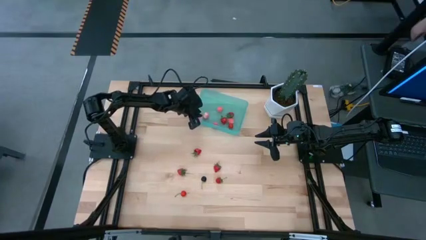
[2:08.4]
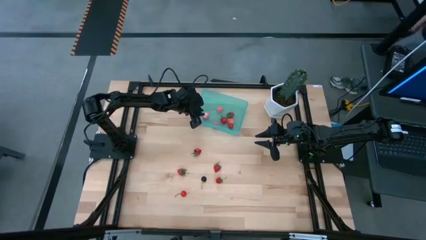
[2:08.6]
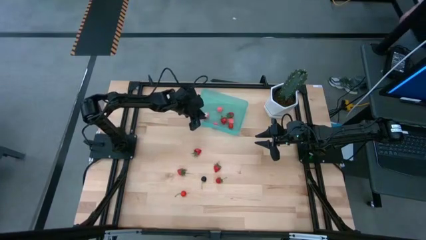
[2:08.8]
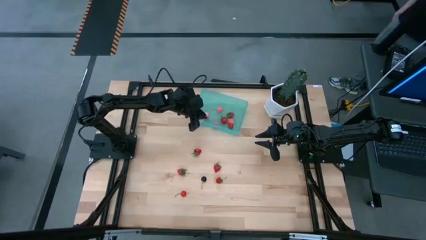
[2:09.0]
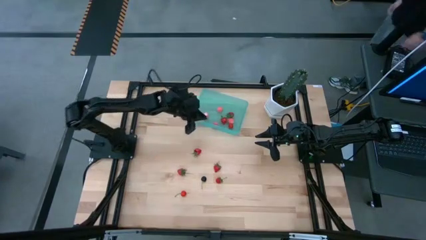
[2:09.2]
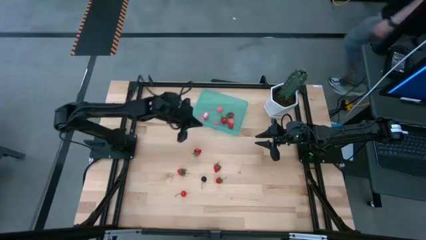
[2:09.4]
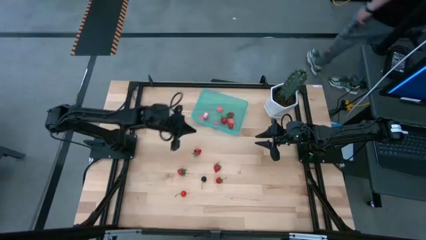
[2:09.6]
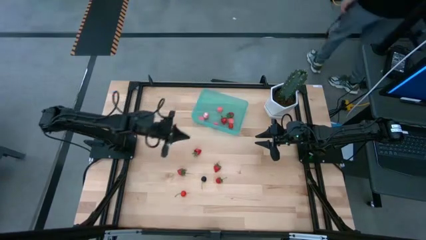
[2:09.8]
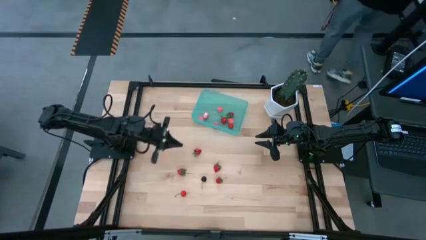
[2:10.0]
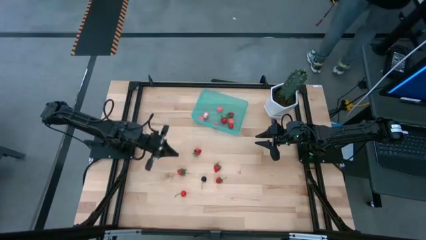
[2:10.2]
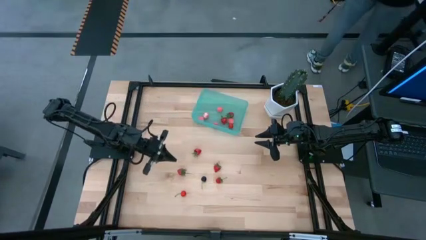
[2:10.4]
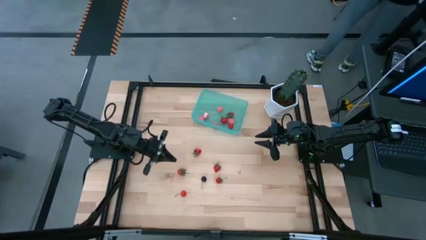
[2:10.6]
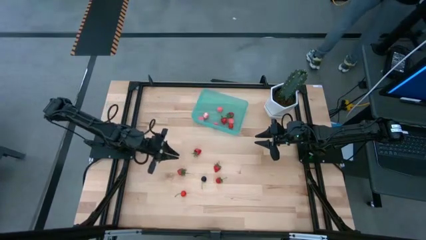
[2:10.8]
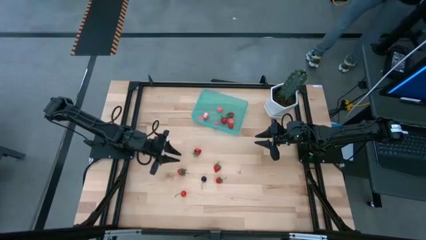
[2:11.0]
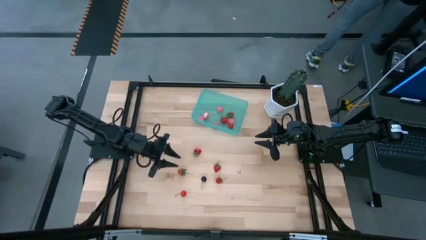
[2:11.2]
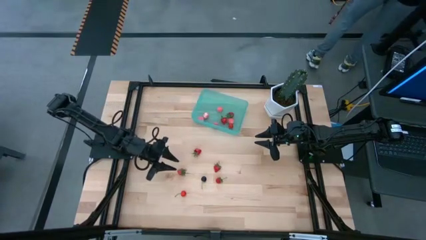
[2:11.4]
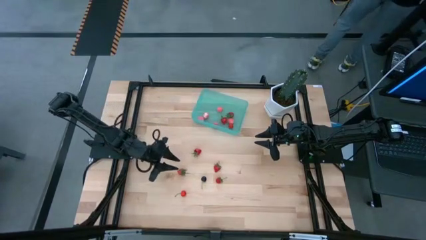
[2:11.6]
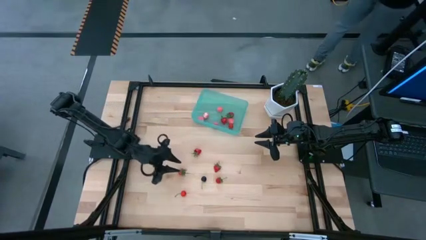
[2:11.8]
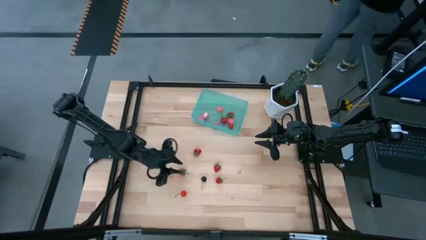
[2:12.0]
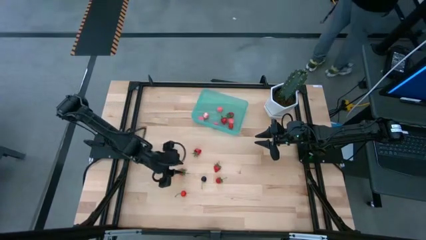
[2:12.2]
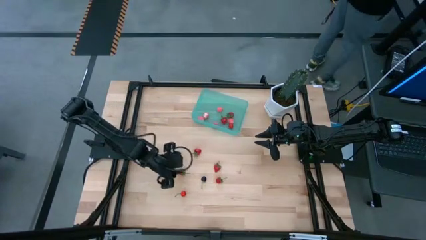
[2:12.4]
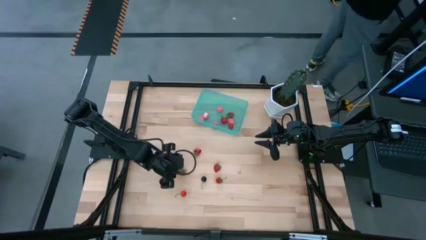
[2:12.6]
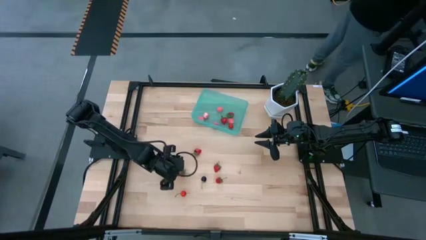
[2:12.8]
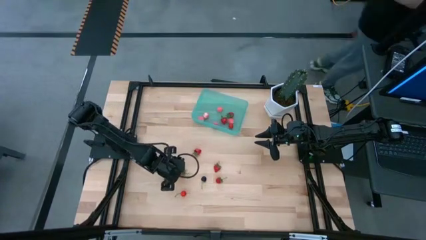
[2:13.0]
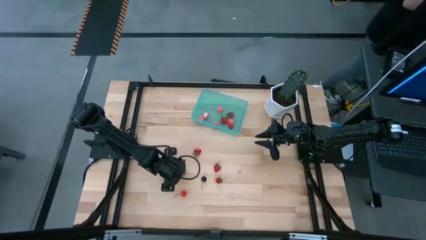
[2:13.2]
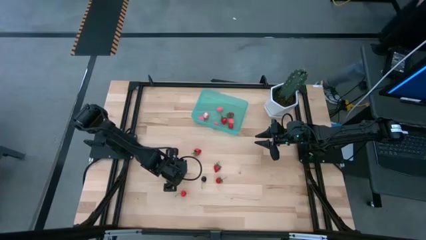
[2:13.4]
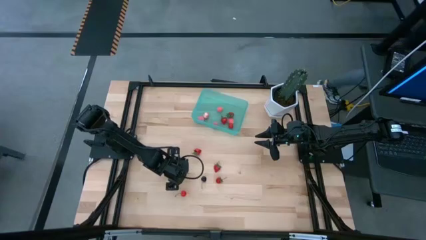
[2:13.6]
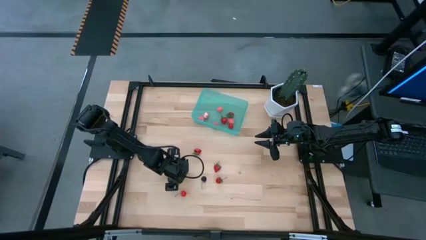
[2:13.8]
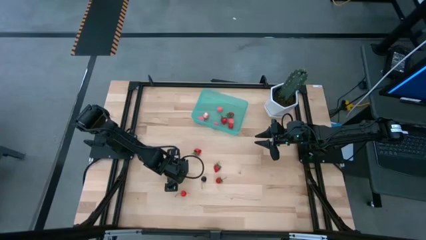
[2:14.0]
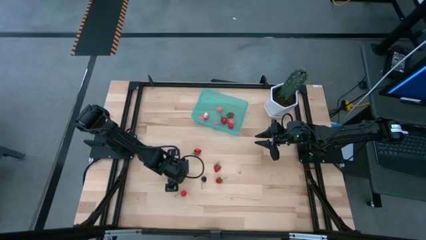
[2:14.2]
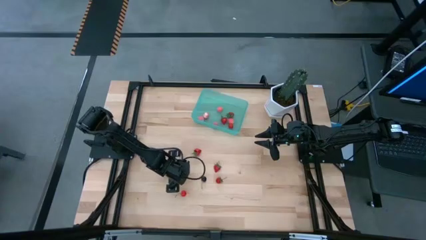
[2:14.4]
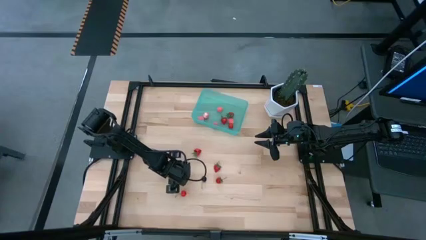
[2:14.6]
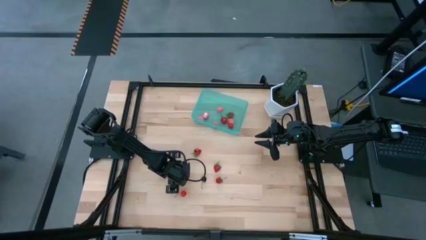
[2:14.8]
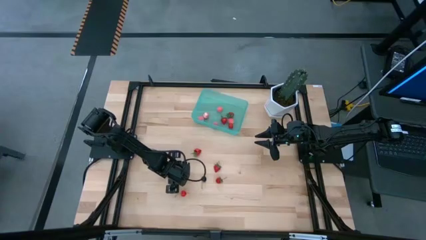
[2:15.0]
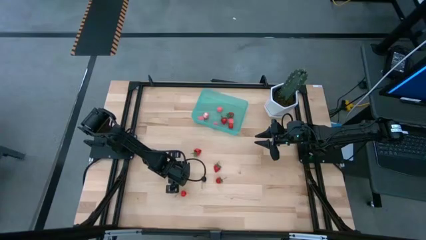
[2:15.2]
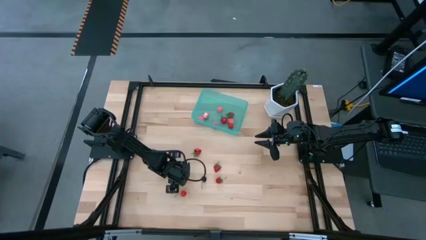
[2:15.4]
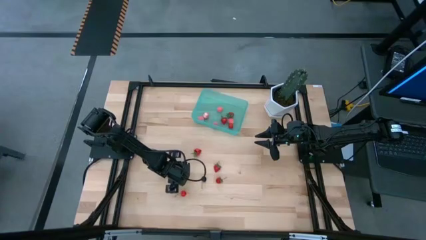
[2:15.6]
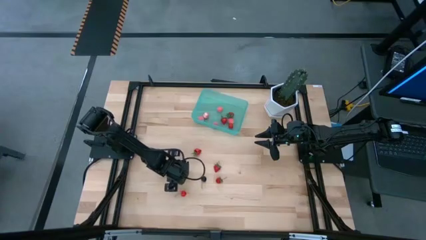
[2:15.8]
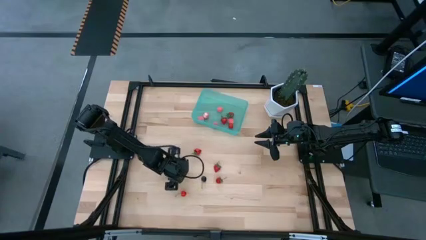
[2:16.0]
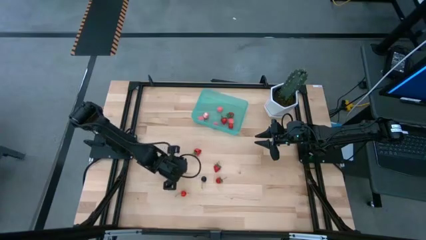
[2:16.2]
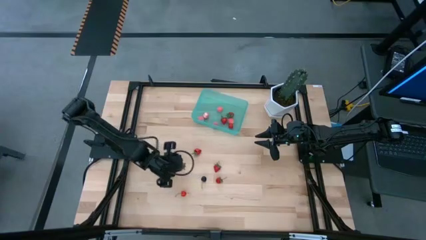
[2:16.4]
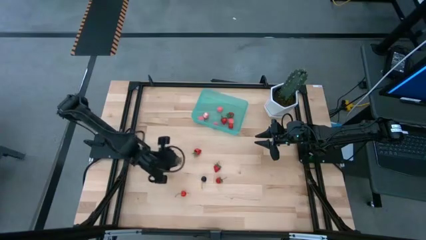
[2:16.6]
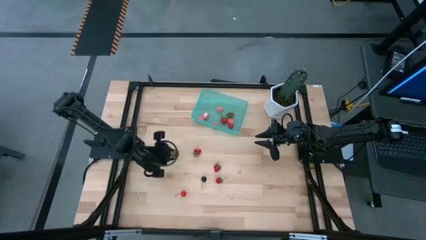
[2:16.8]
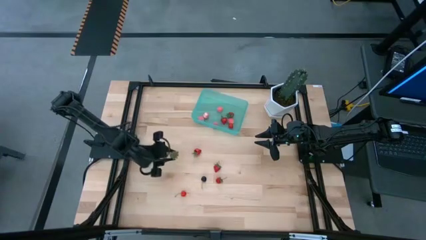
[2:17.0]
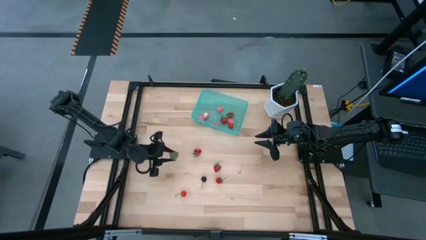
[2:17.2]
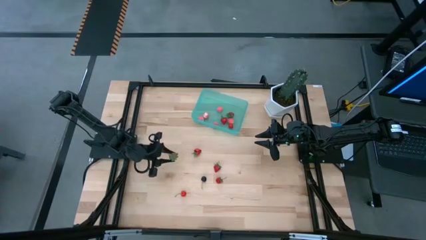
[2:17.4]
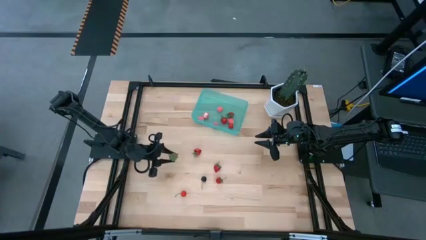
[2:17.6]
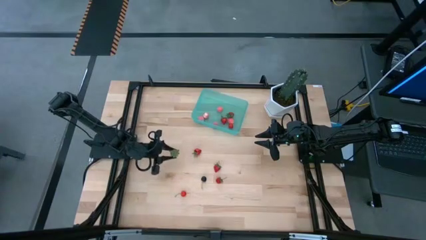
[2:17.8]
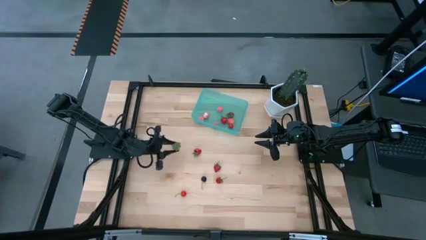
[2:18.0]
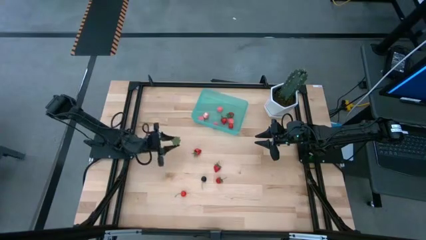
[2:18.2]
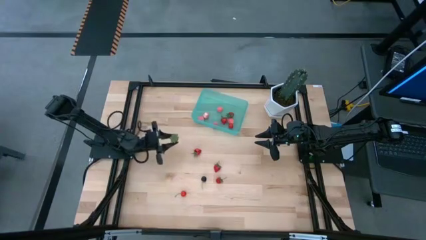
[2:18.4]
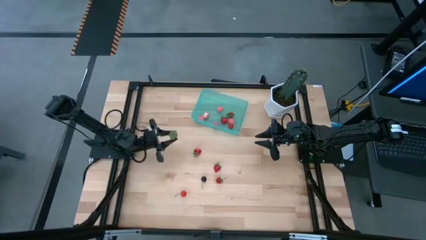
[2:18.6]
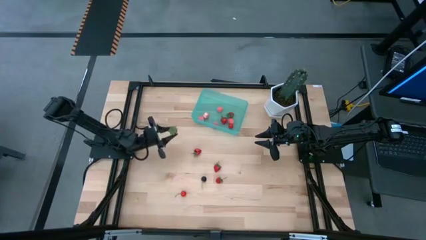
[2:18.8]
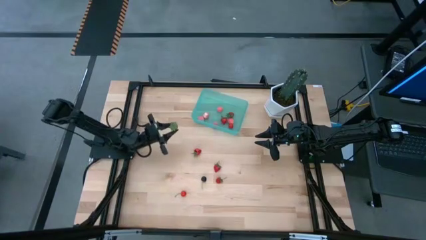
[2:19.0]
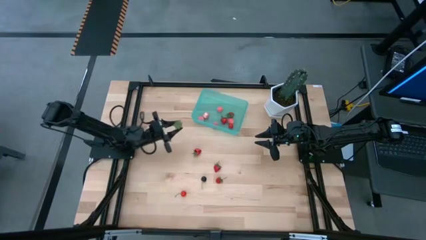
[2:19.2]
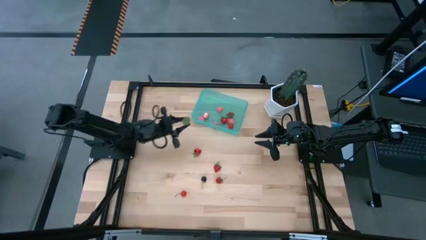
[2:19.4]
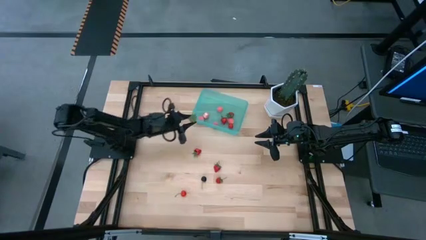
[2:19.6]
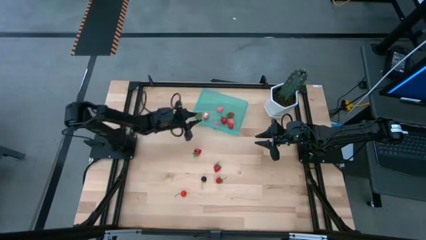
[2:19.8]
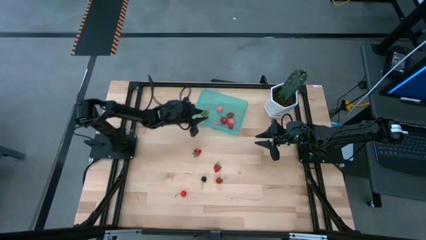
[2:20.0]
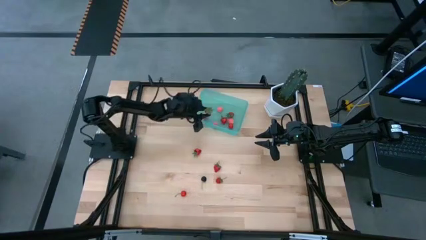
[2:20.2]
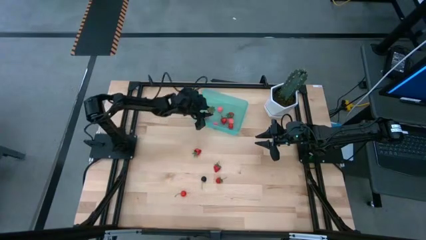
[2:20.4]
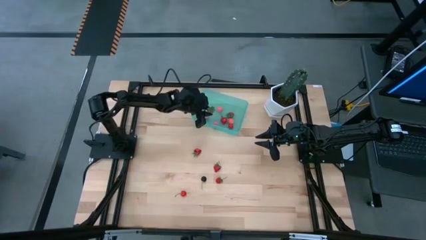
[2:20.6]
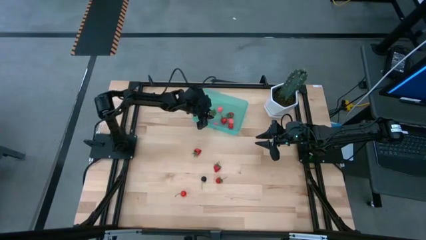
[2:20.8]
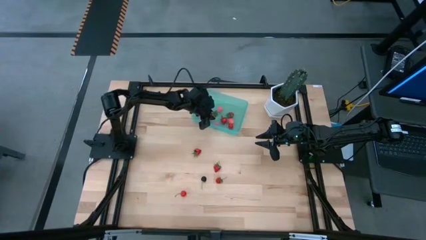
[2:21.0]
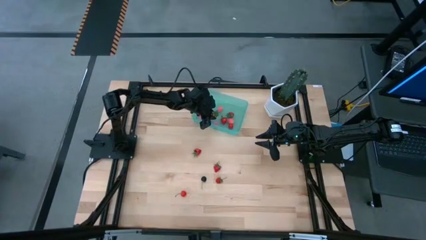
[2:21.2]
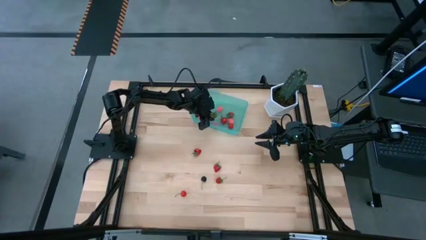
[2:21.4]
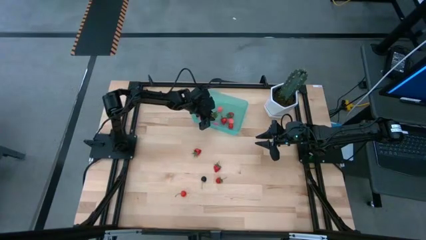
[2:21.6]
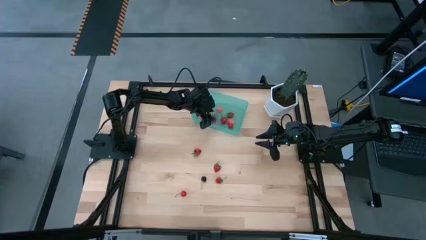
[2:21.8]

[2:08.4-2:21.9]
Task: Pick and placing Produce into tupperware
Put the red strawberry into the light blue bin

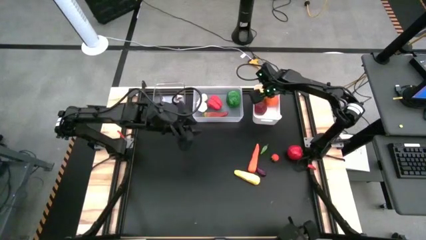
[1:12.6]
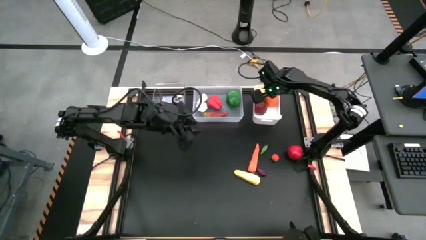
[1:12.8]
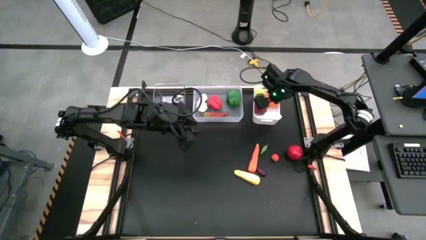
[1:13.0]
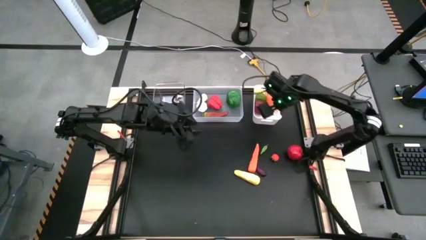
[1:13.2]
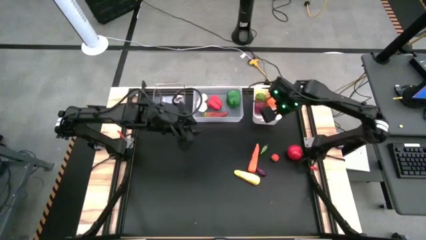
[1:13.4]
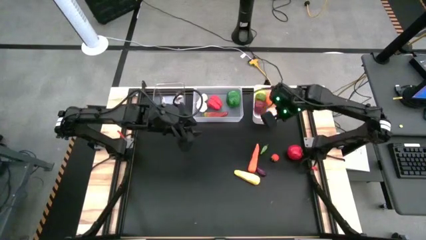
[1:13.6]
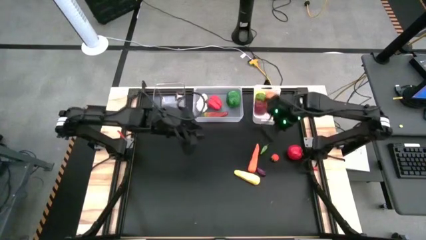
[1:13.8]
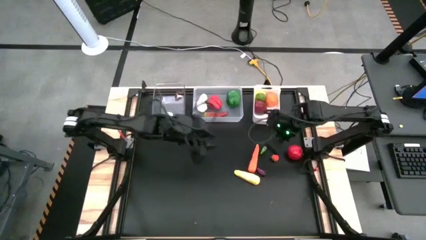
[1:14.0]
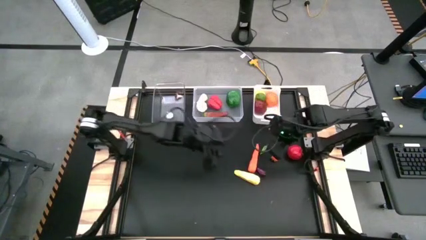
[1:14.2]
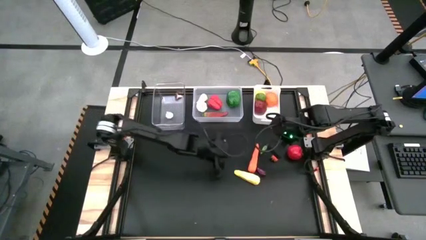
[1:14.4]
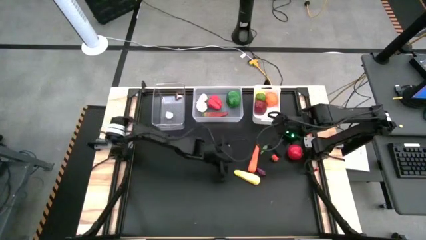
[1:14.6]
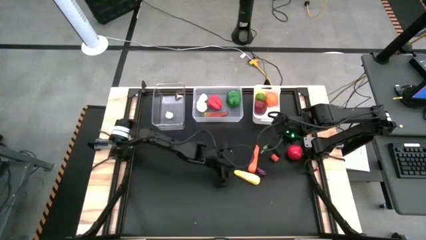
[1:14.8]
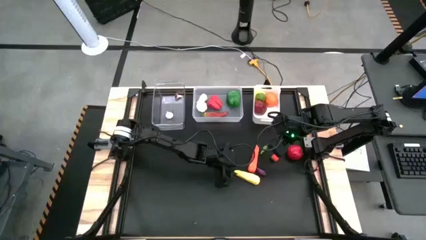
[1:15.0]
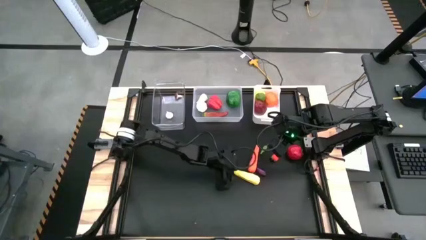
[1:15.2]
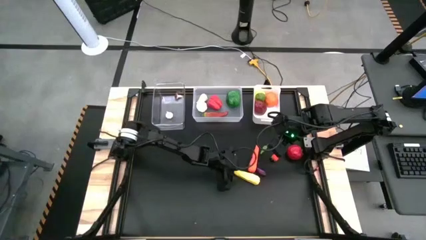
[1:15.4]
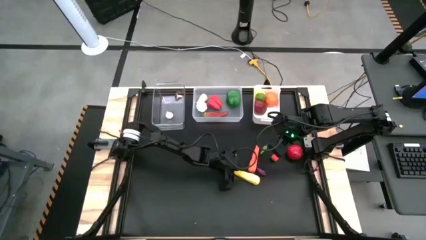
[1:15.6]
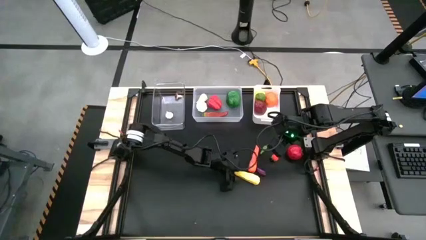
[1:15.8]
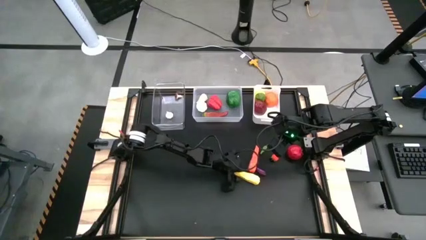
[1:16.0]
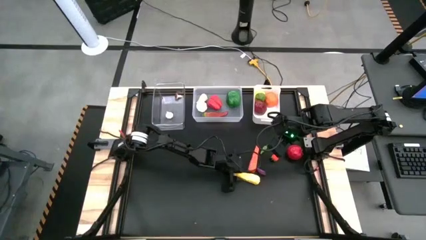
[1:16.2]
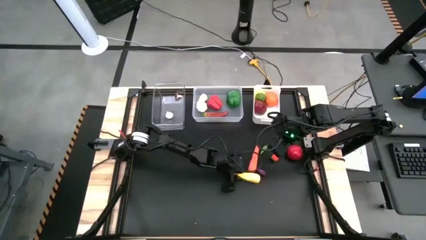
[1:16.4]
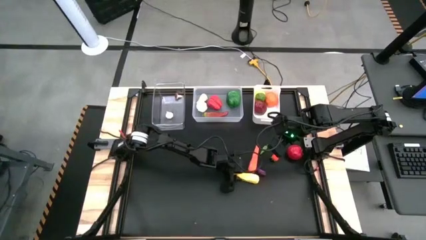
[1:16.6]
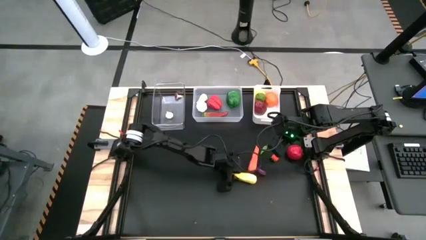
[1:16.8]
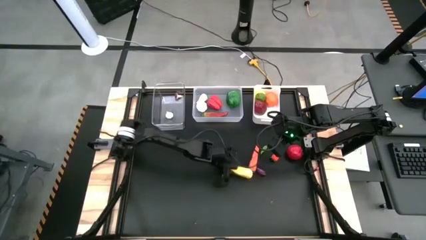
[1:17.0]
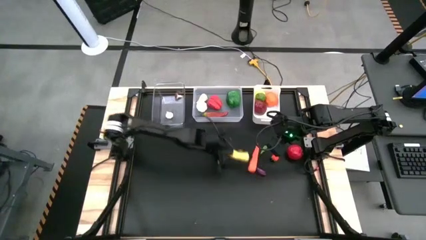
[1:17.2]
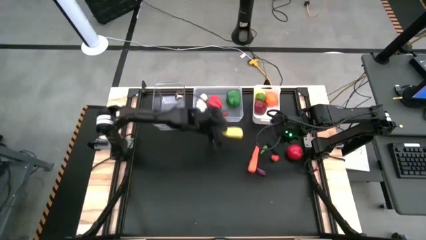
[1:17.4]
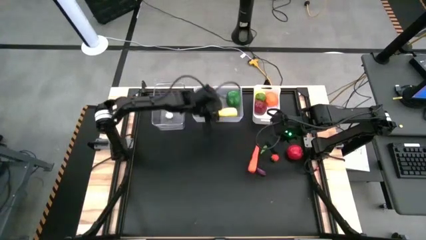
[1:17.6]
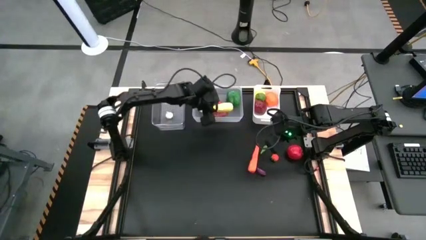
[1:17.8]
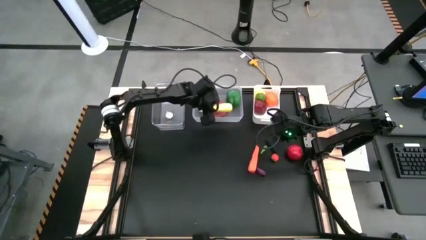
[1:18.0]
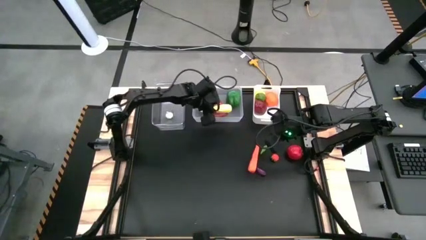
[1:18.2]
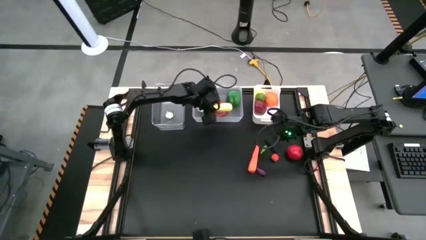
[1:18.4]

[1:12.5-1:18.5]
Task: Sort produce into baskets
Put the yellow corn into the transparent bin
